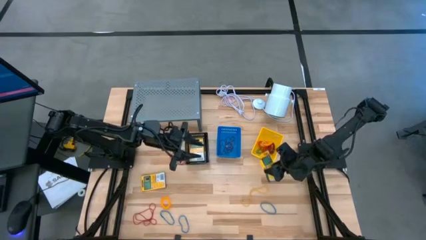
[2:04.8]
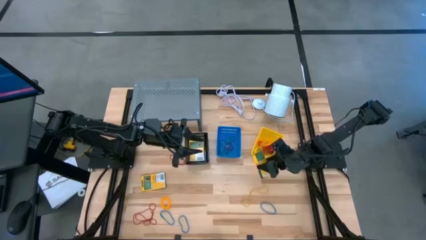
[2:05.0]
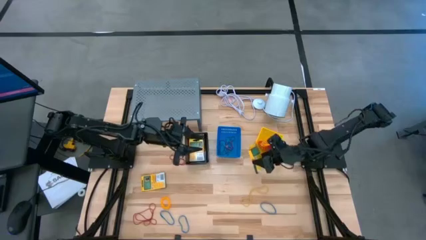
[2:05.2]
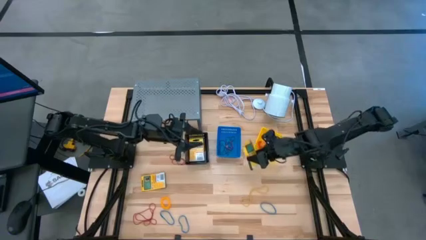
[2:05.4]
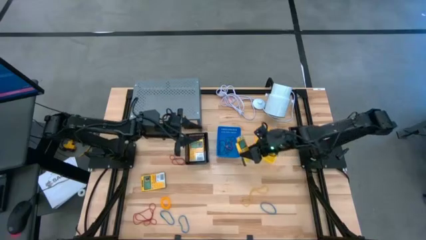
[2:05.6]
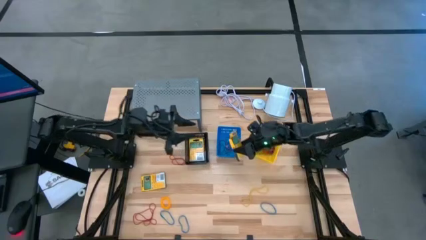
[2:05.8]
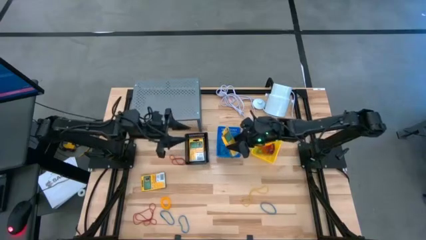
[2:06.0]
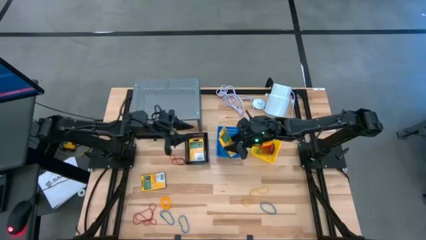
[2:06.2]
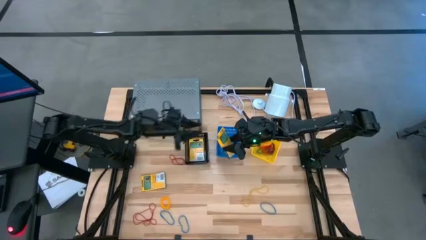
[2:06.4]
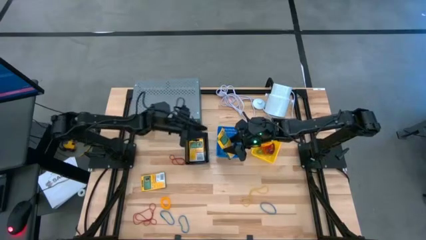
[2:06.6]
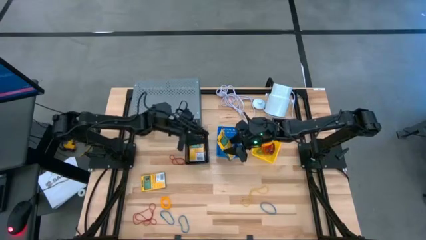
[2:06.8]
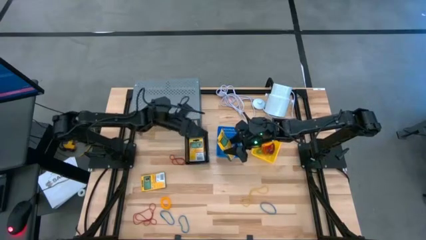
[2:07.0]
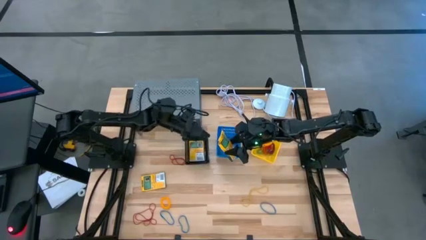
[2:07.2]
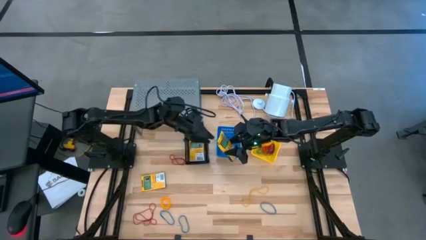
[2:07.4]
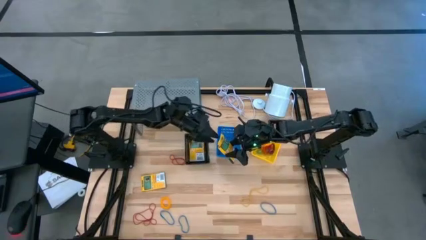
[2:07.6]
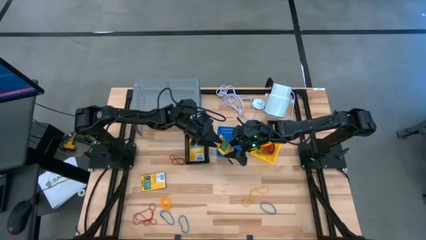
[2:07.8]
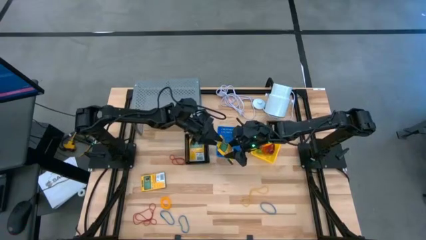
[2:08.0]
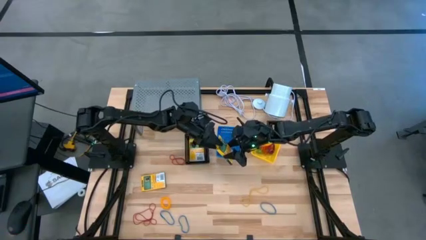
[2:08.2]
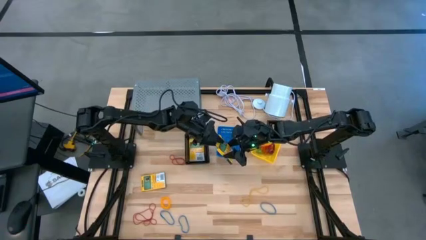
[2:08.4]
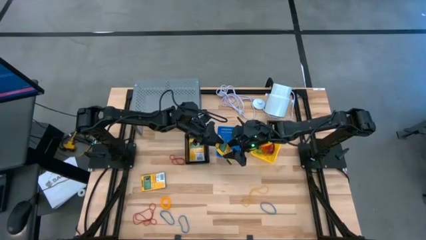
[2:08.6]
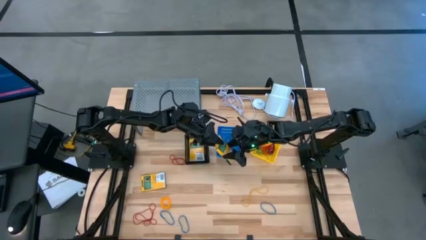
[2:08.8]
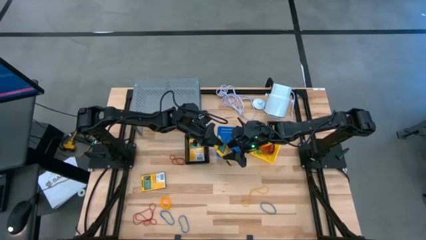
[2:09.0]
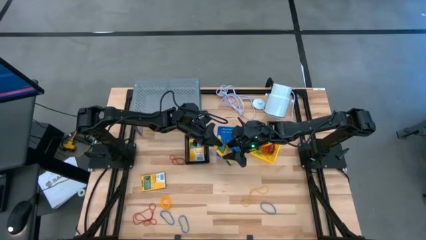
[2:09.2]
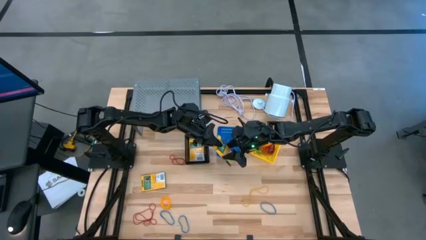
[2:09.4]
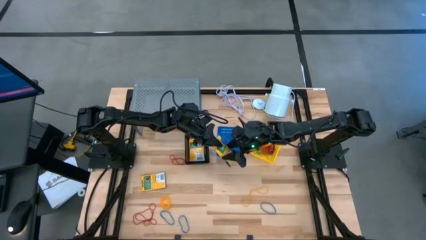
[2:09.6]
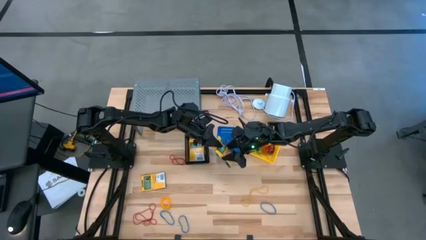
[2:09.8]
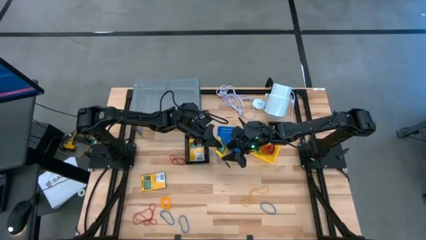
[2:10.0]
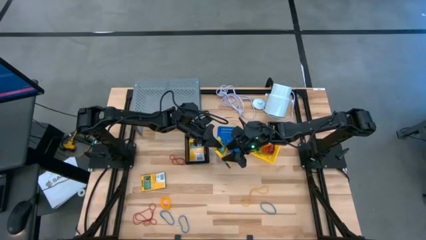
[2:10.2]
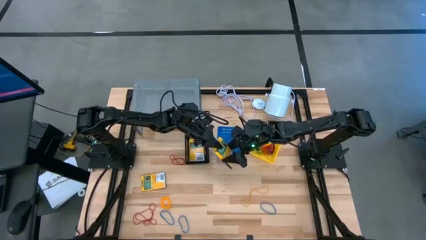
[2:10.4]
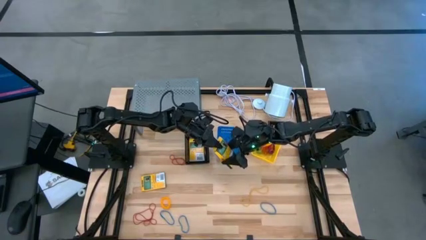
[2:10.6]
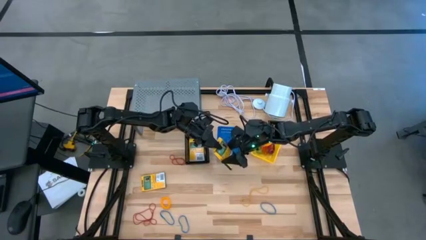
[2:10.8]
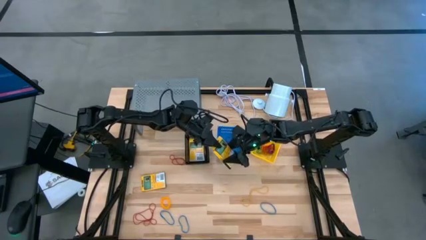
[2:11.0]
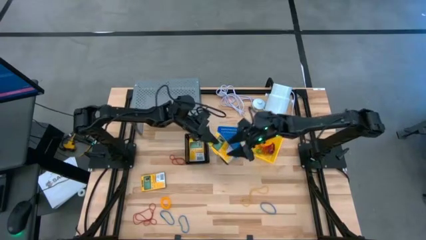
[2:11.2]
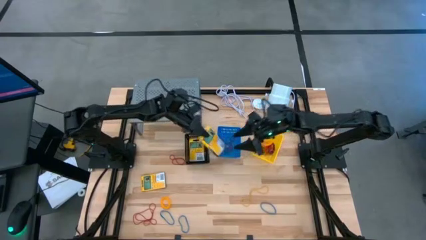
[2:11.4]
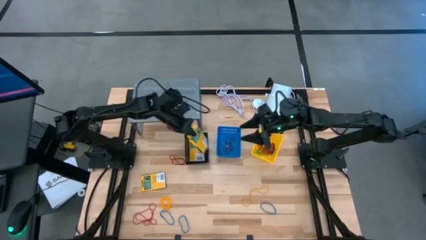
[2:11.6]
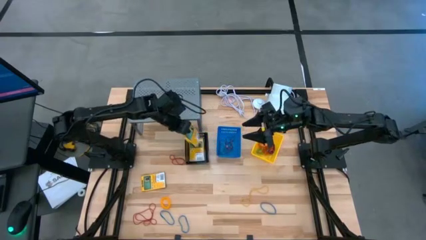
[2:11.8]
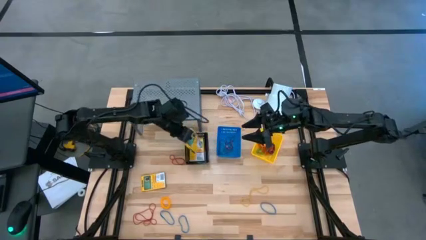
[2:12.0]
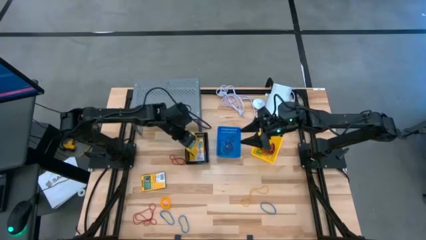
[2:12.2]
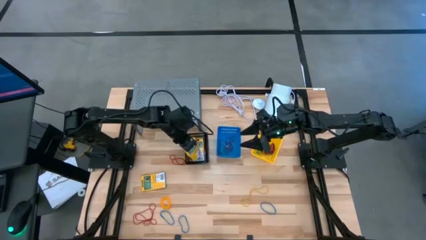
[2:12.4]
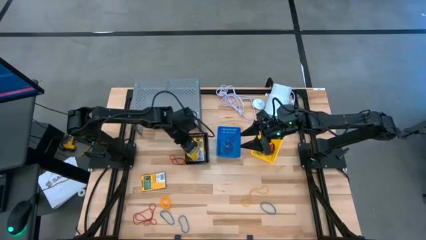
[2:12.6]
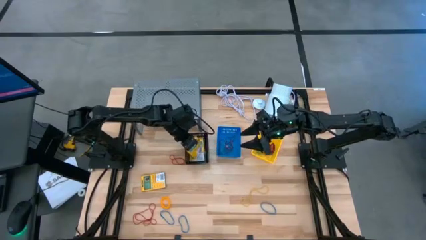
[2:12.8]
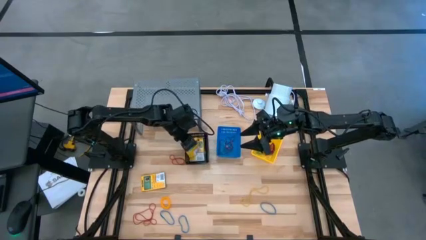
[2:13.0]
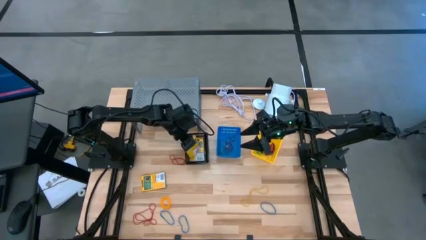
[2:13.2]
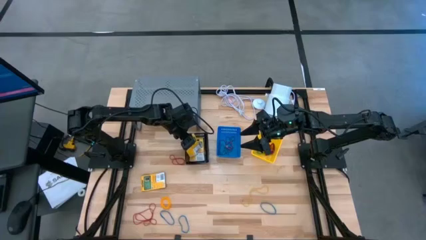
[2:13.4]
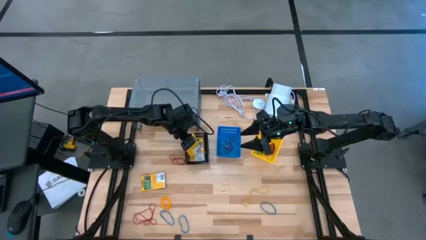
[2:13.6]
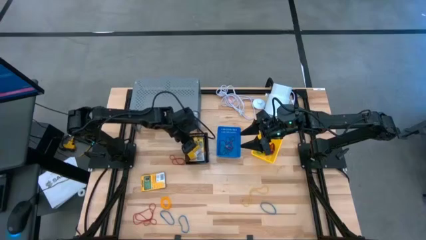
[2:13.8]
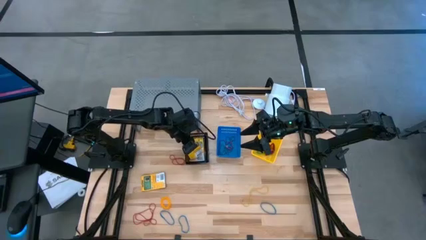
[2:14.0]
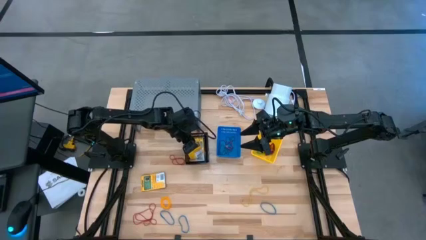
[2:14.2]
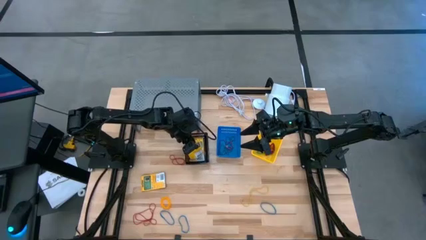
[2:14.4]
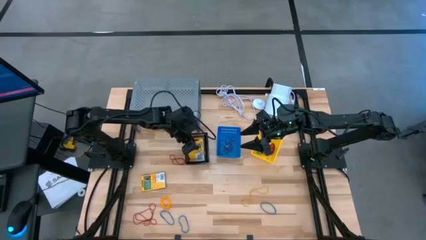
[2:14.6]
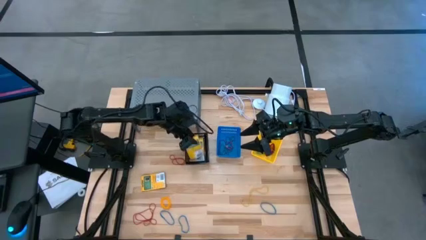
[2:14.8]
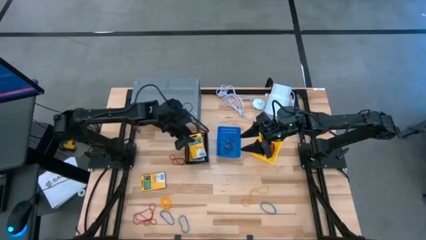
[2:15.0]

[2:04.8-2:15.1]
Task: Pick & Place Office Desk Supplies
Put the crayon box into the black basket
